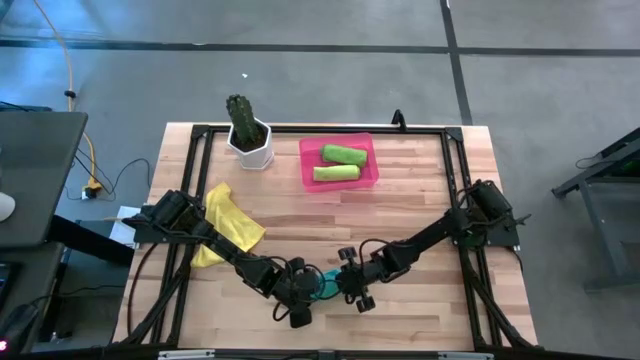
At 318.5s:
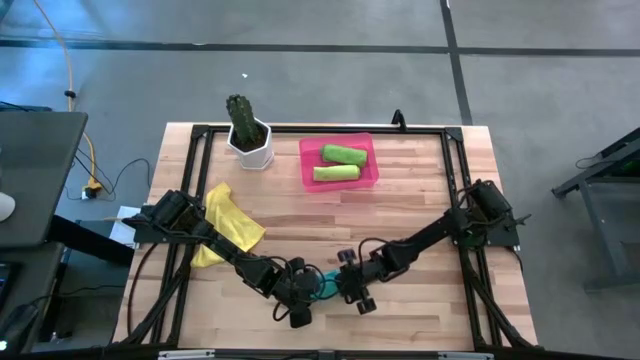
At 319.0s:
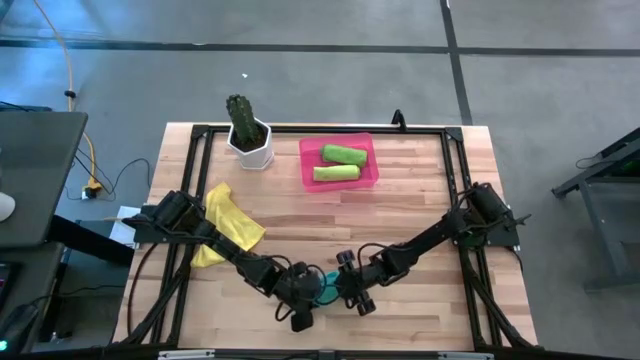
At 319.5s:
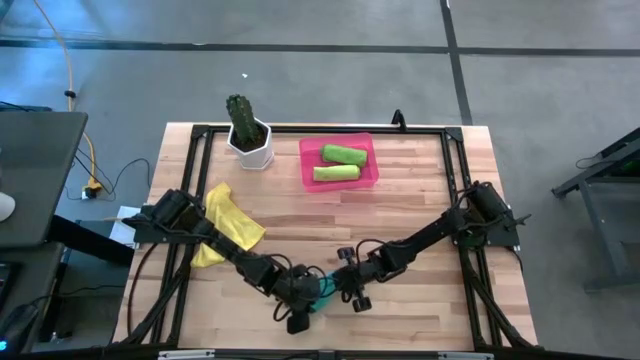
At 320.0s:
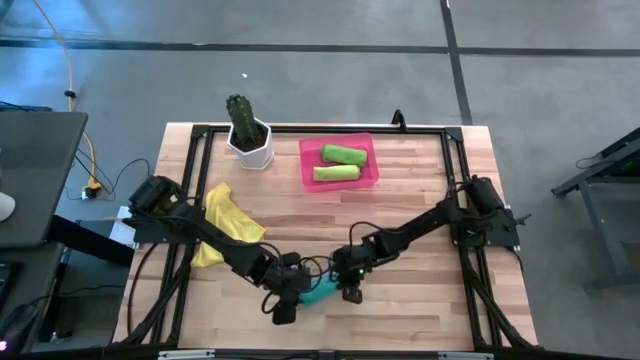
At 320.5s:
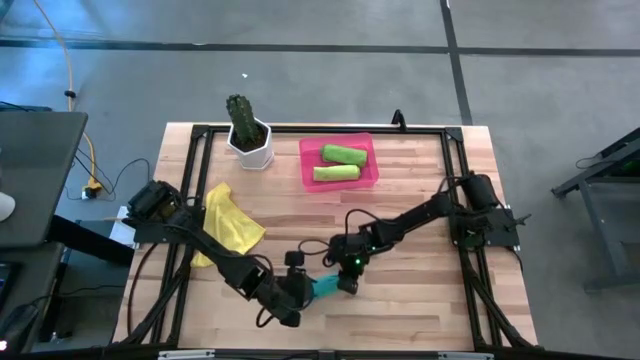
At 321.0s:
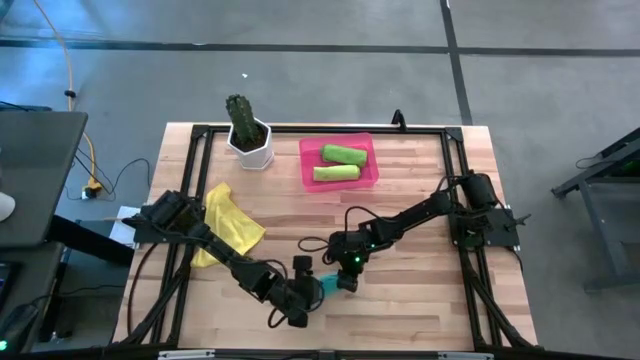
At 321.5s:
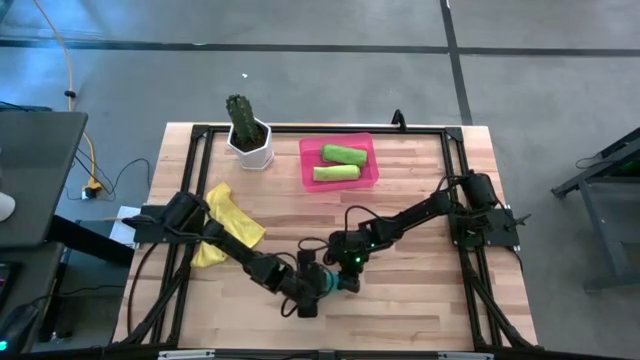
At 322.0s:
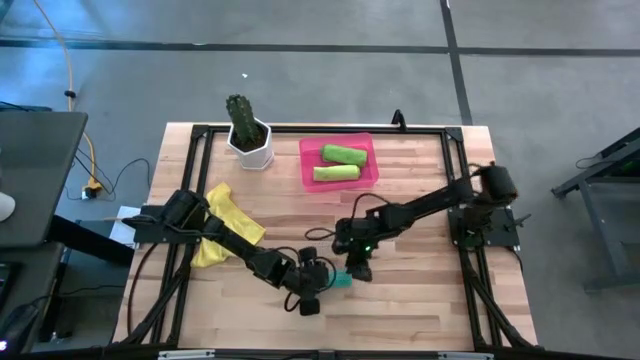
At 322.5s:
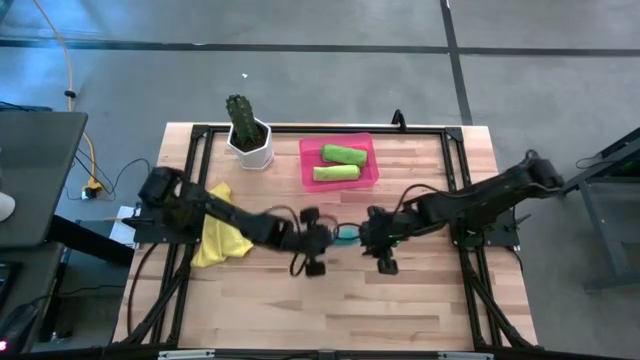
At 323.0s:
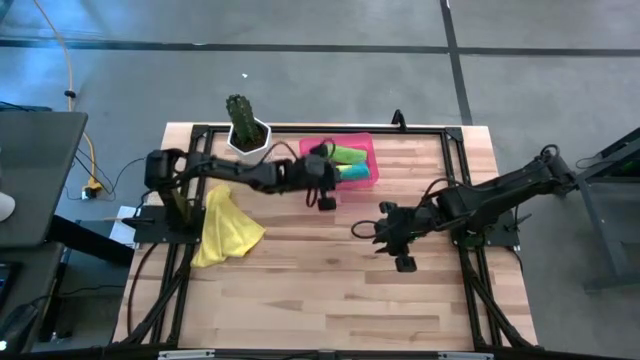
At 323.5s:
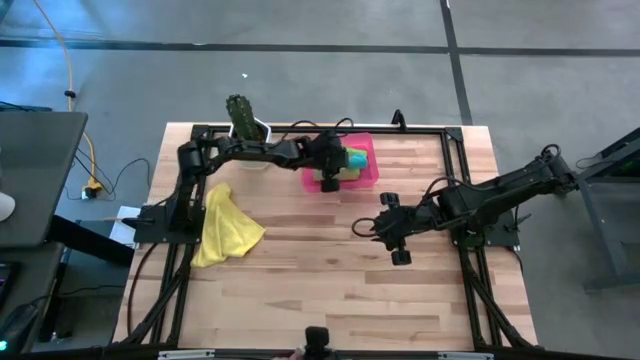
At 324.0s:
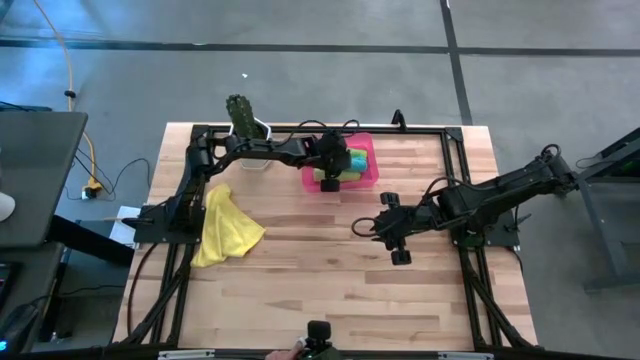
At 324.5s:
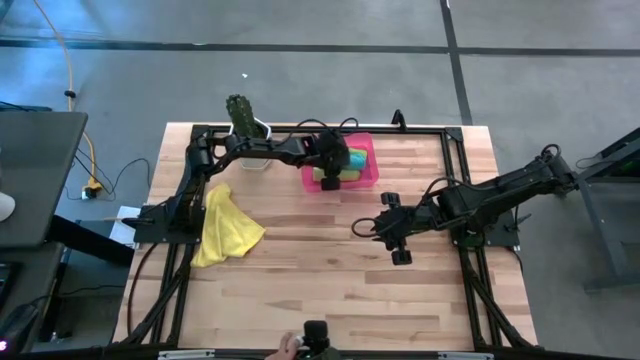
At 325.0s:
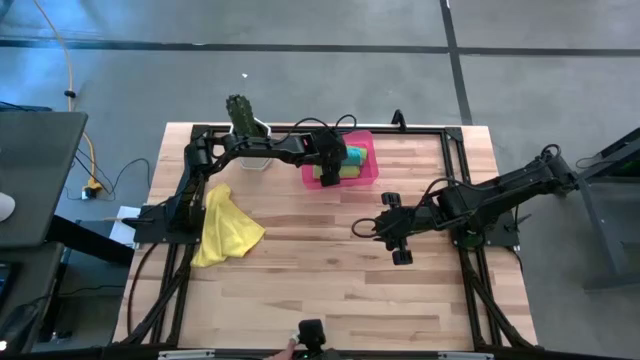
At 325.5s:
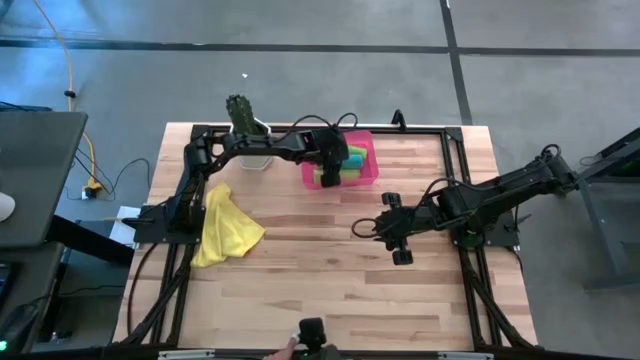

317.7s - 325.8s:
Task: Roll microfiber towels into tight, uniform cylinder then place into a basket
Put the rolled blue microfiber cloth into the pink bin

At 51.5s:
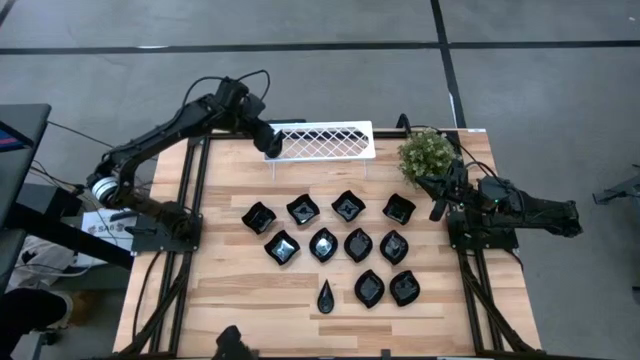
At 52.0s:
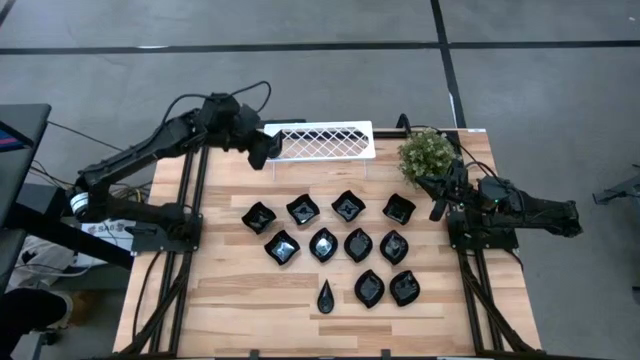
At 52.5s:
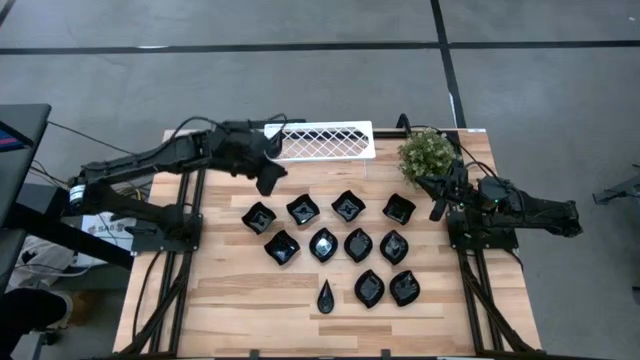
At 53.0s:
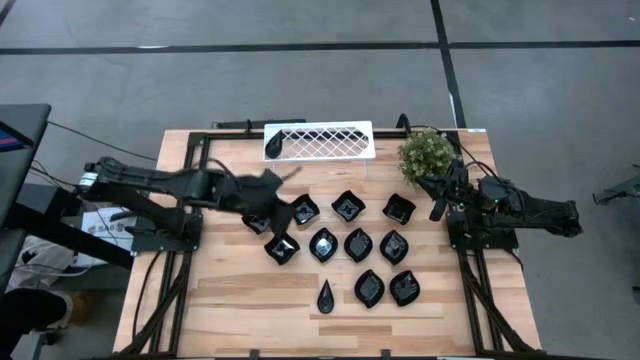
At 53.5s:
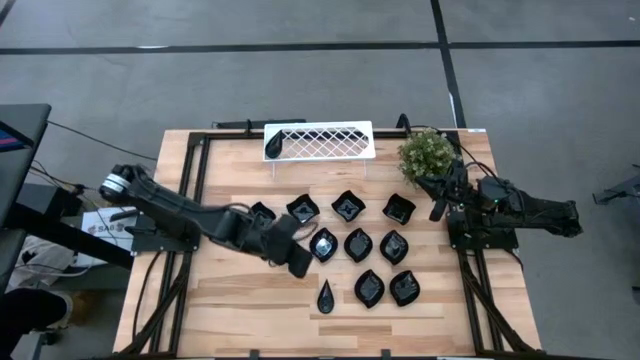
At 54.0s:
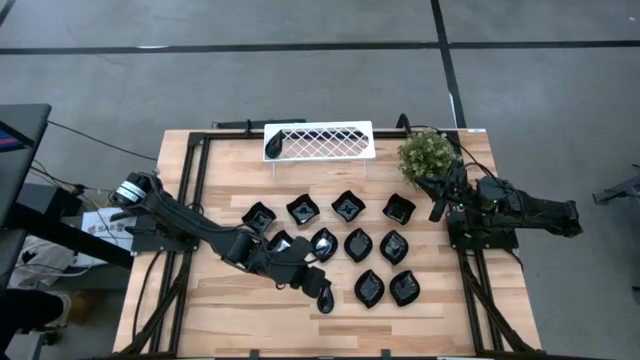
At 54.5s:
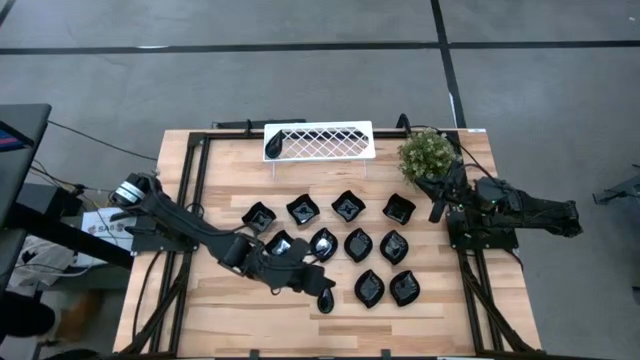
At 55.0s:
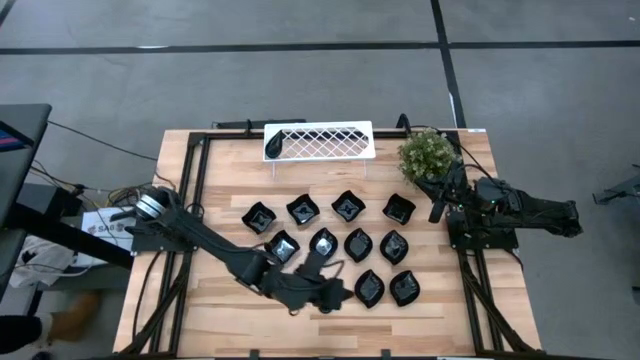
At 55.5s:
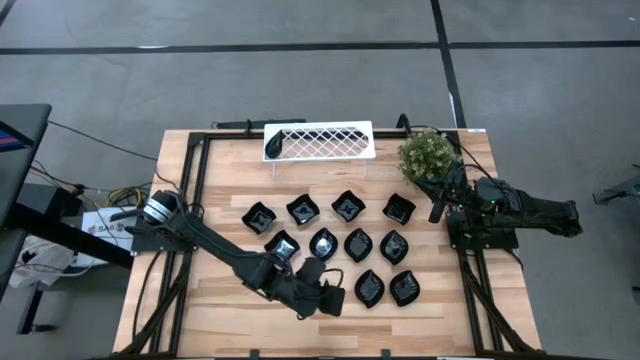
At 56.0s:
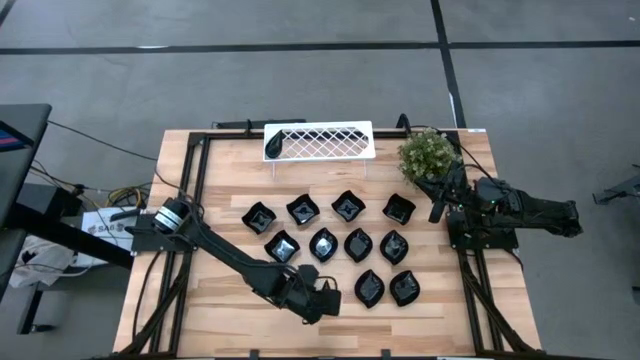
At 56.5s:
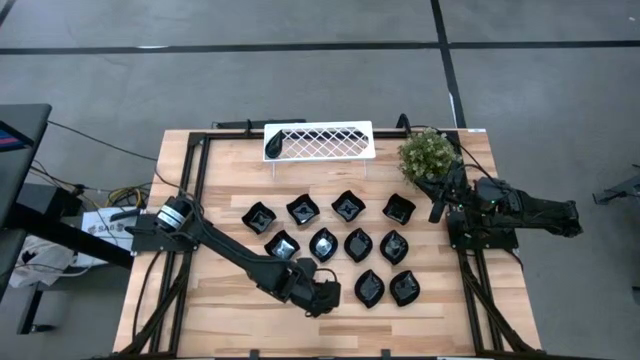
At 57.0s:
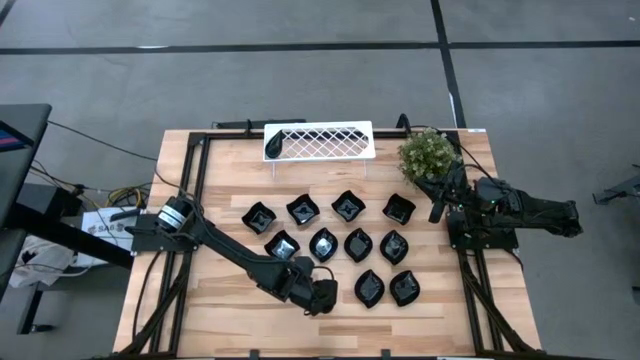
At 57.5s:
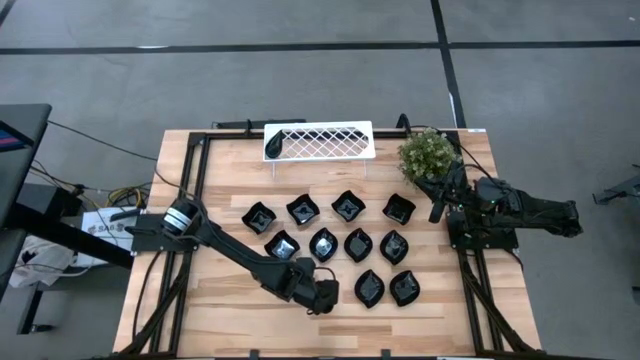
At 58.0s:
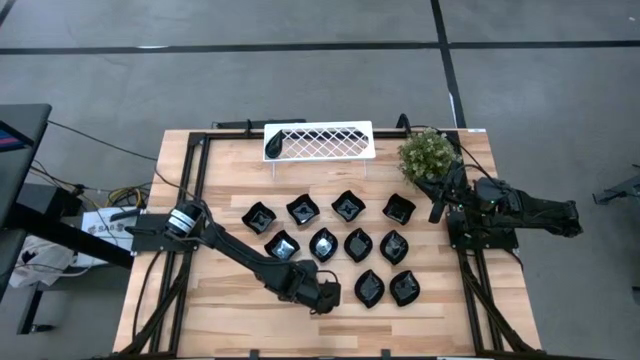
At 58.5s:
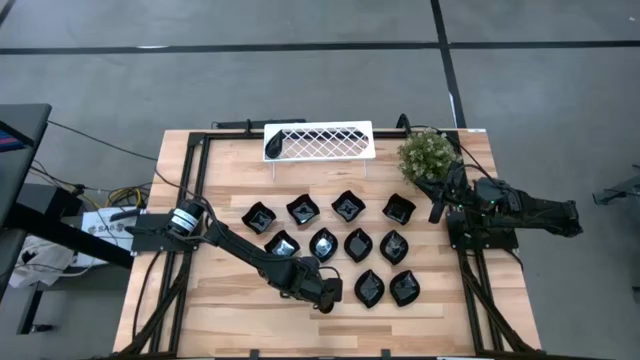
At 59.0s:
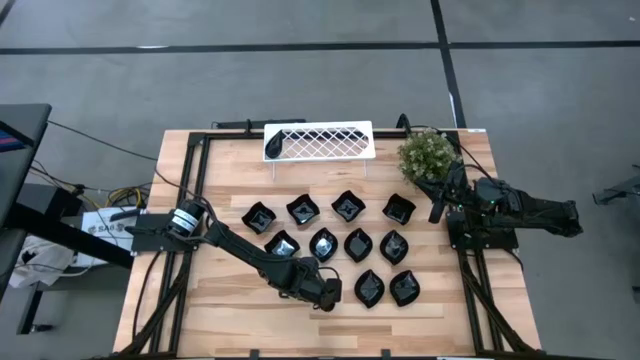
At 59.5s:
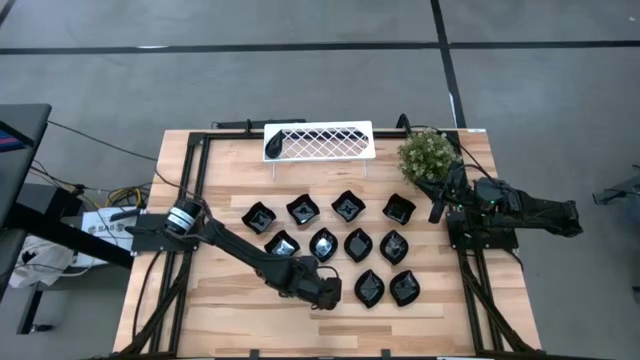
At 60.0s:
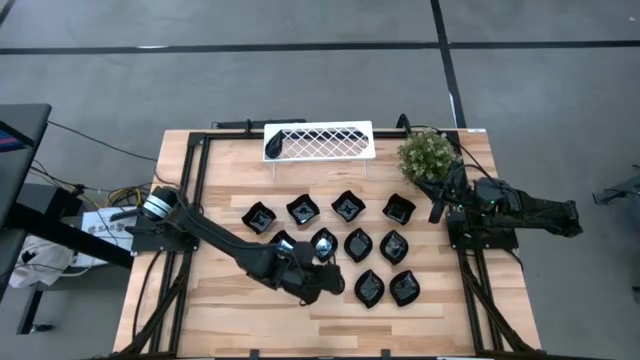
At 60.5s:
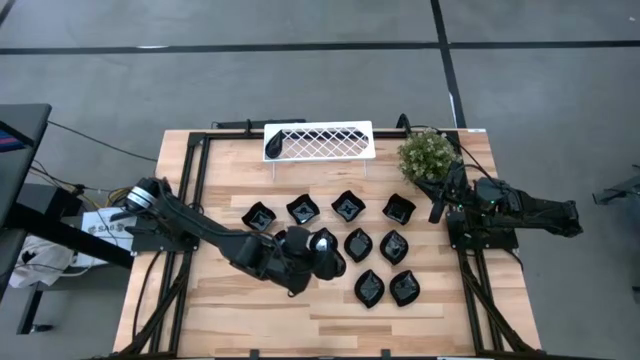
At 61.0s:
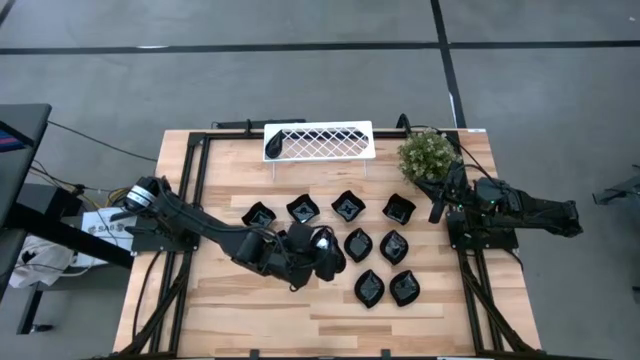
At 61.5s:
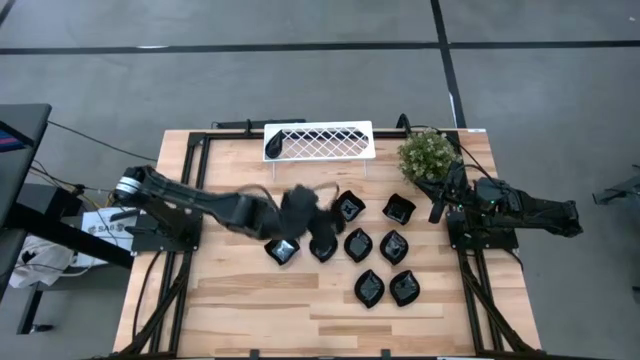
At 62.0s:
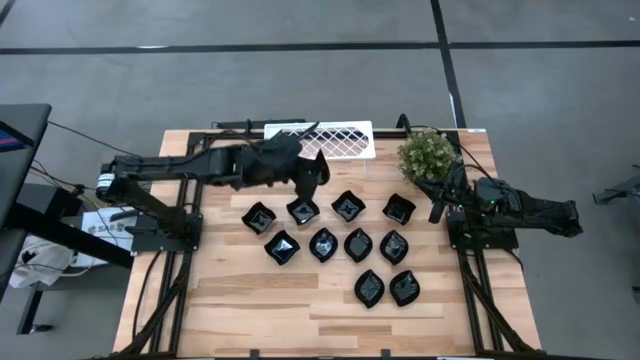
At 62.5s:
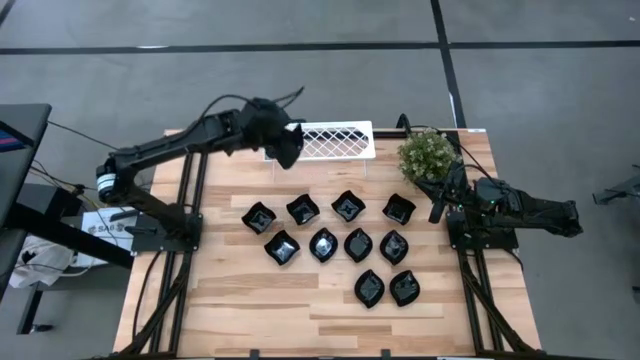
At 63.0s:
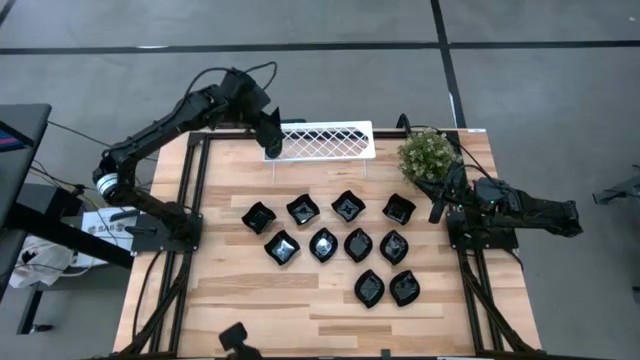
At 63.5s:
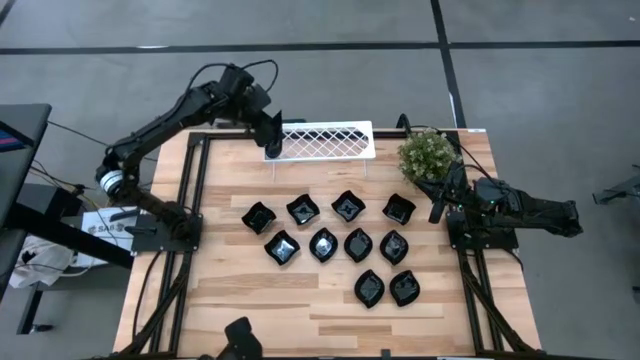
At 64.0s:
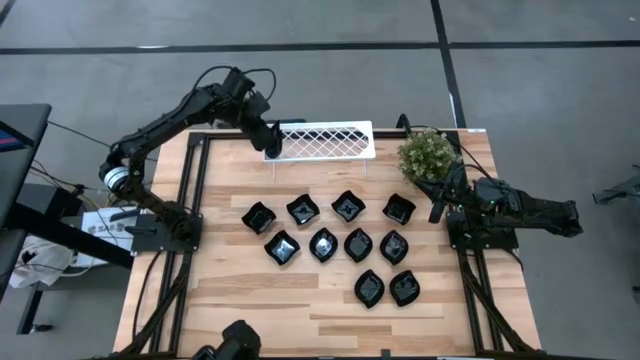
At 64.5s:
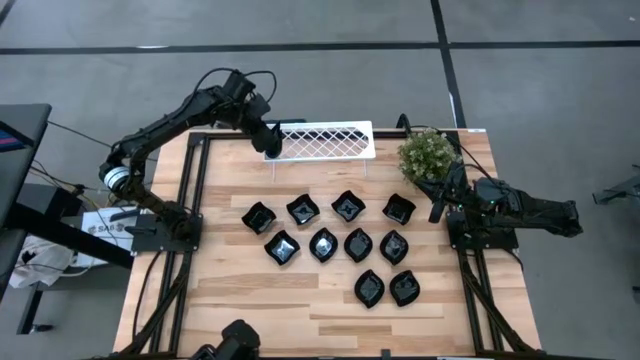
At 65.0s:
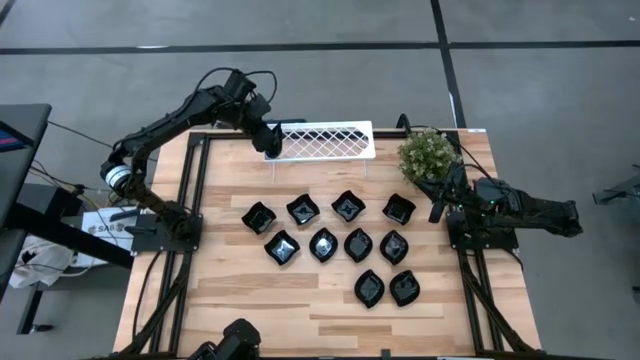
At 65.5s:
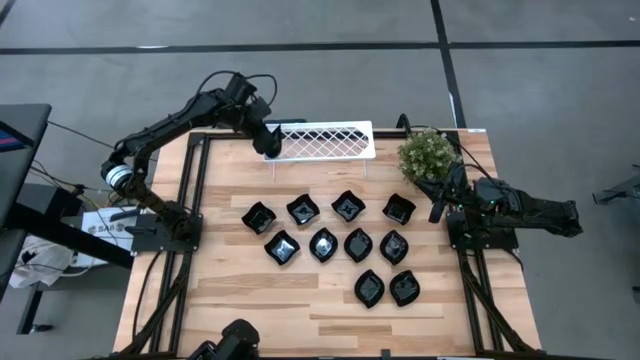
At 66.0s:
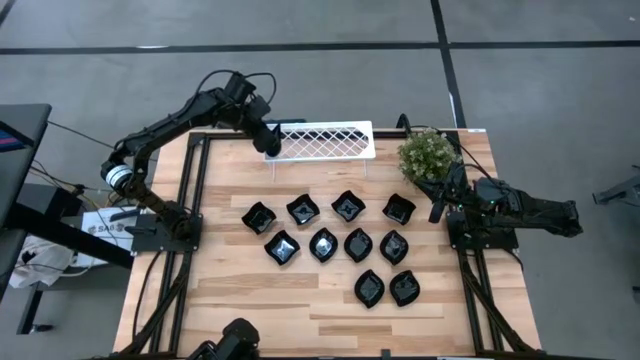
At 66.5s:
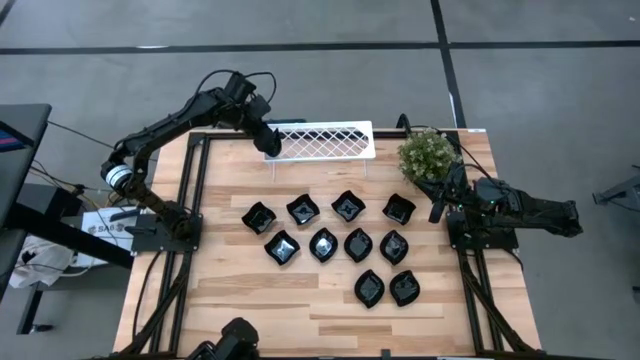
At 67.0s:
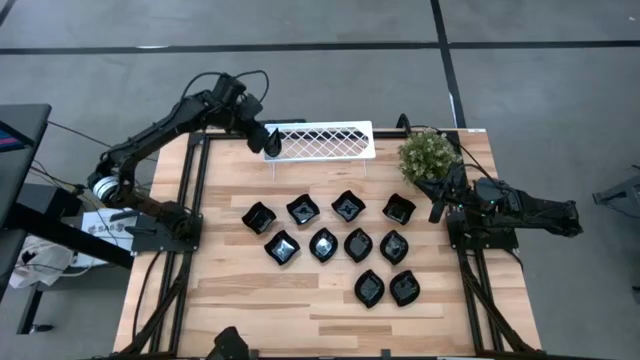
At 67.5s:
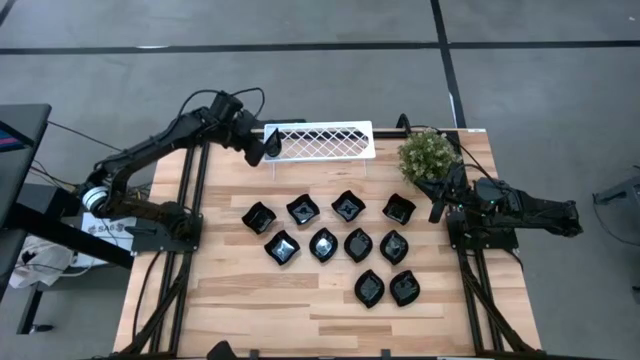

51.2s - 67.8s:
Task: Pick & Place Mini shaped plates
Stack the black drop-shaped plate on top of the black drop-shaped plates on the shelf
